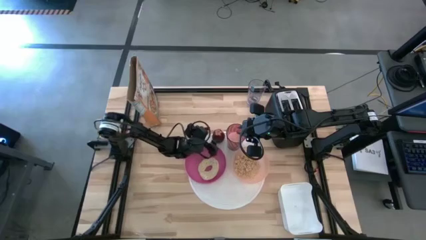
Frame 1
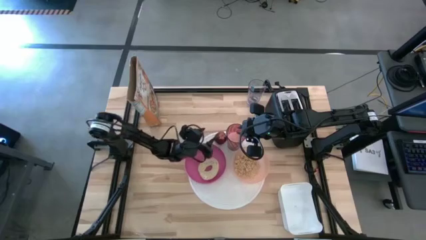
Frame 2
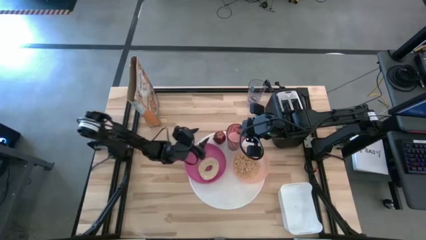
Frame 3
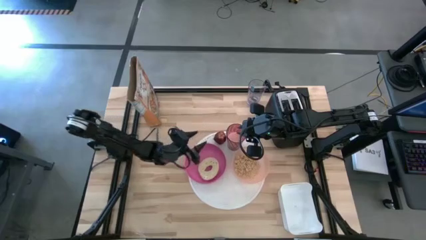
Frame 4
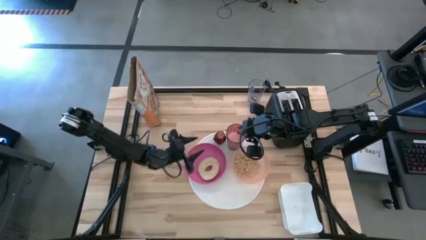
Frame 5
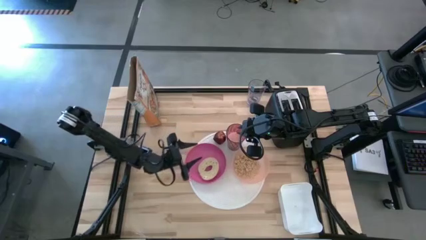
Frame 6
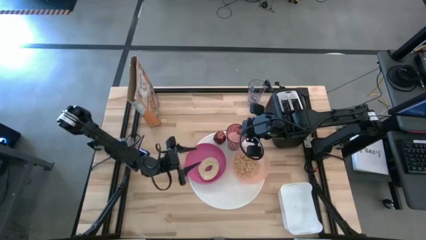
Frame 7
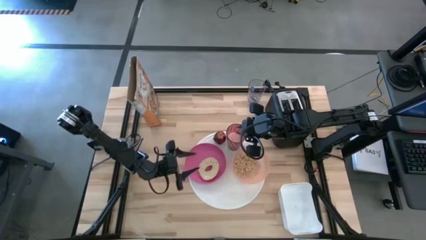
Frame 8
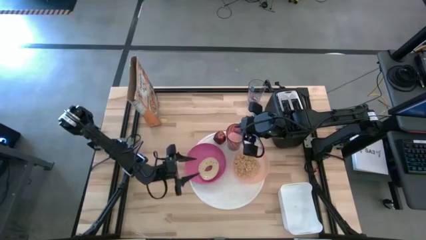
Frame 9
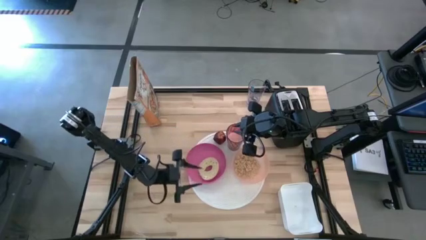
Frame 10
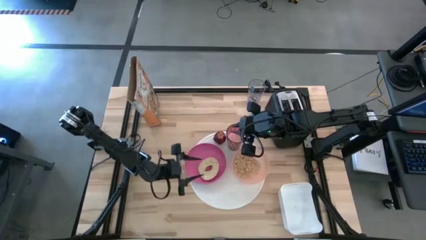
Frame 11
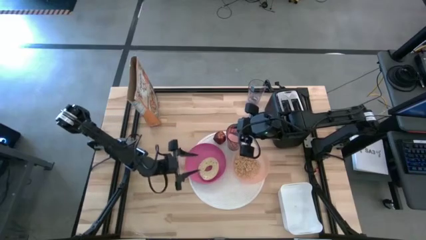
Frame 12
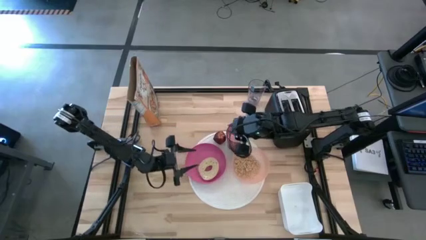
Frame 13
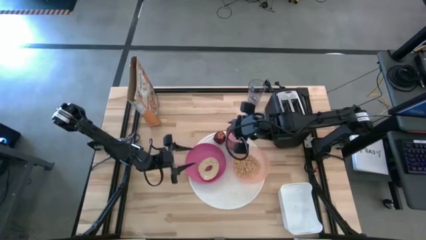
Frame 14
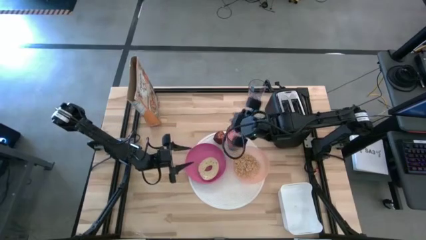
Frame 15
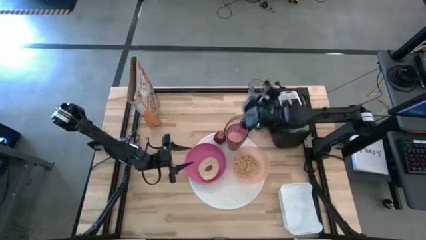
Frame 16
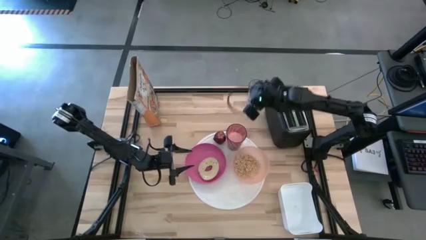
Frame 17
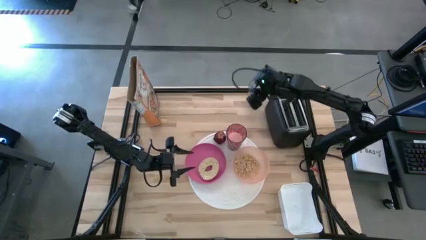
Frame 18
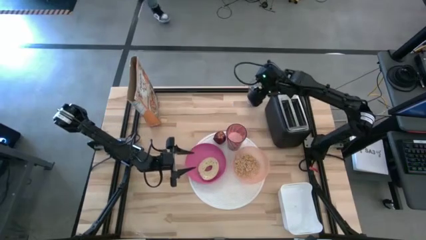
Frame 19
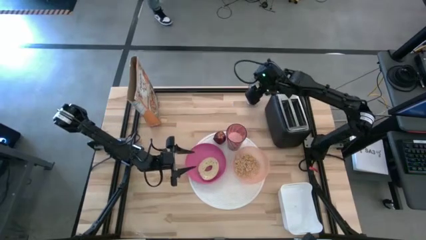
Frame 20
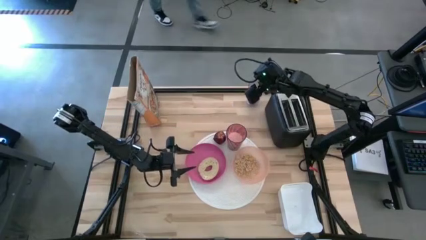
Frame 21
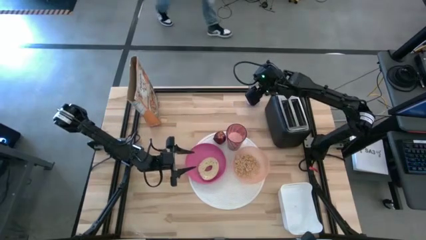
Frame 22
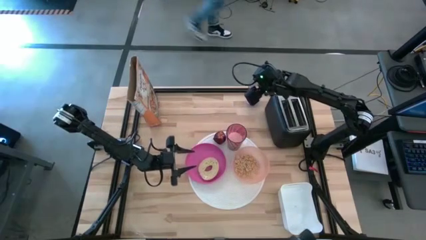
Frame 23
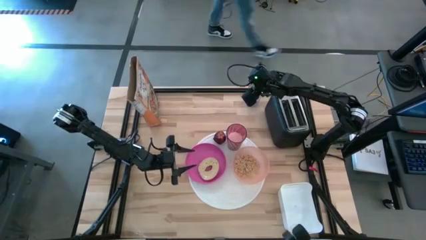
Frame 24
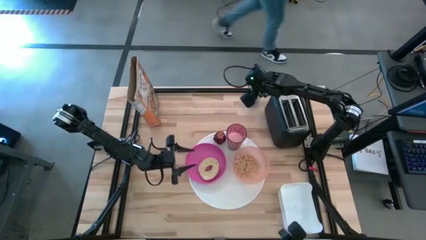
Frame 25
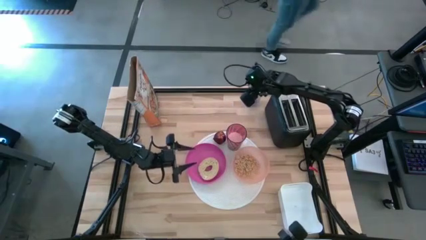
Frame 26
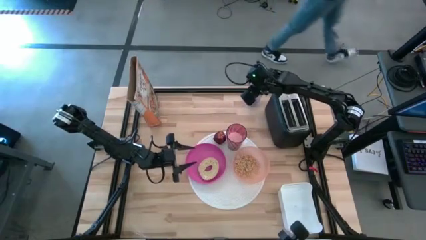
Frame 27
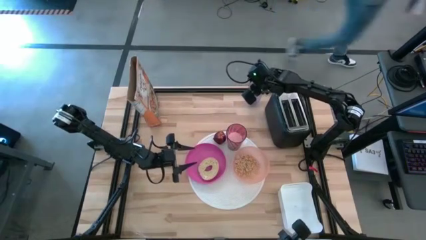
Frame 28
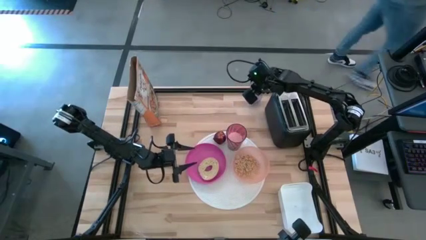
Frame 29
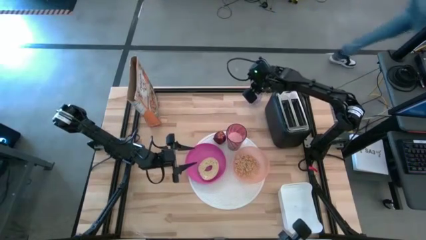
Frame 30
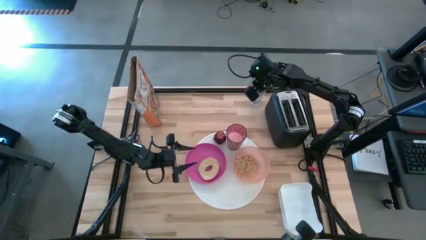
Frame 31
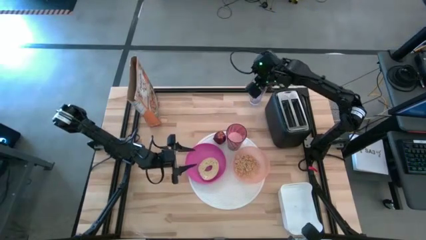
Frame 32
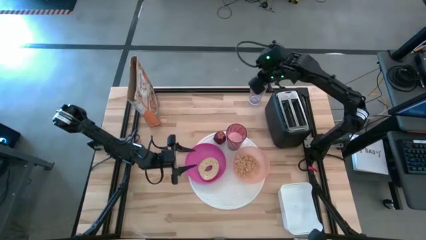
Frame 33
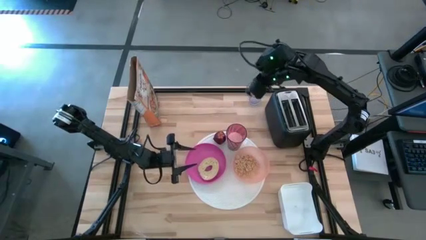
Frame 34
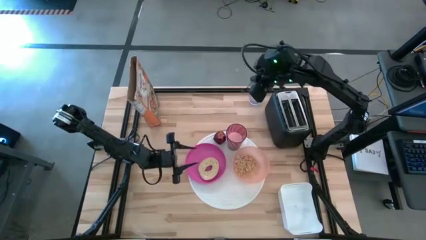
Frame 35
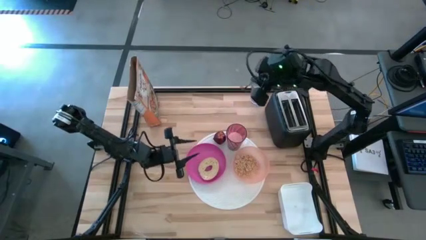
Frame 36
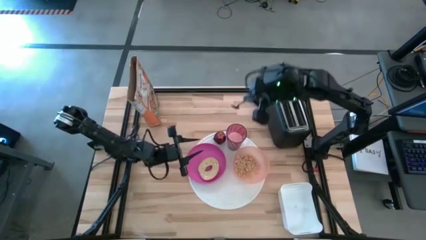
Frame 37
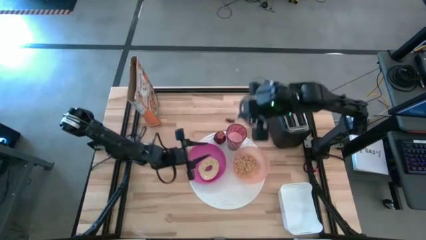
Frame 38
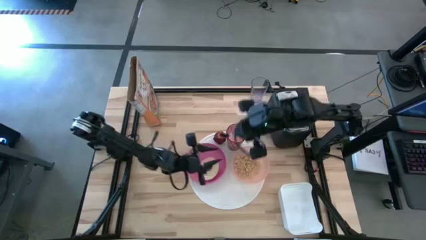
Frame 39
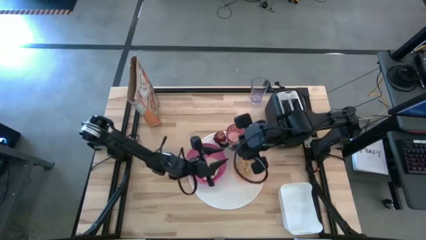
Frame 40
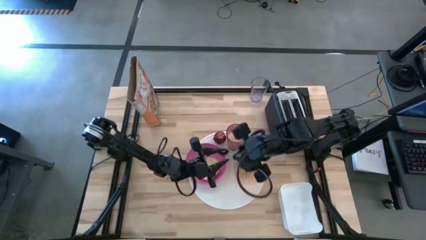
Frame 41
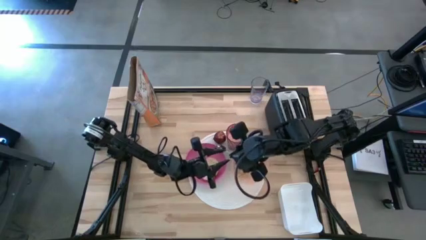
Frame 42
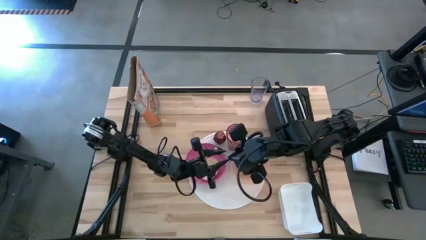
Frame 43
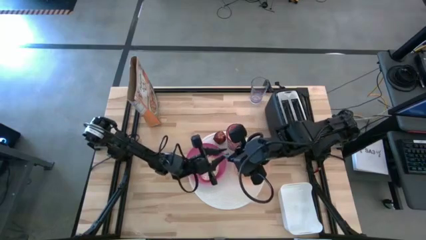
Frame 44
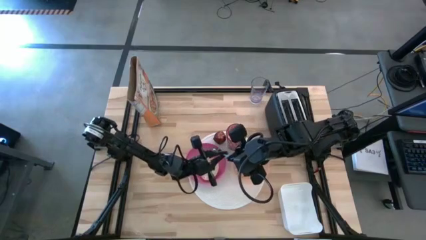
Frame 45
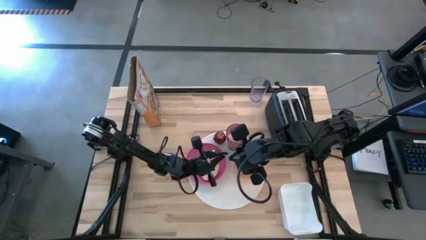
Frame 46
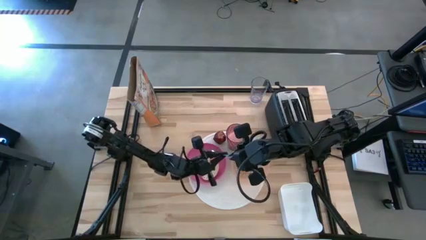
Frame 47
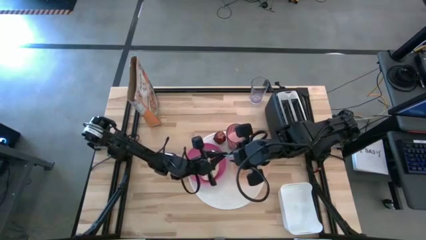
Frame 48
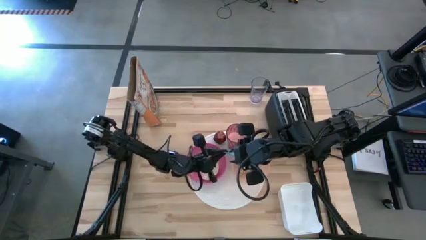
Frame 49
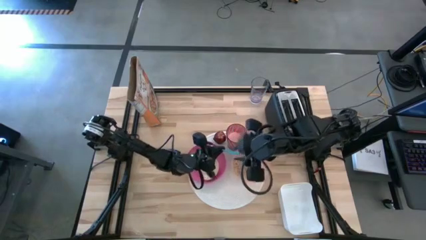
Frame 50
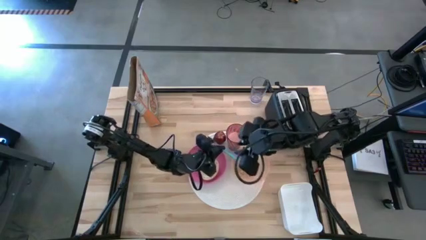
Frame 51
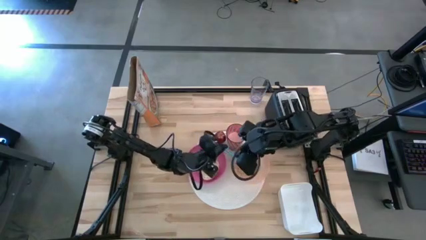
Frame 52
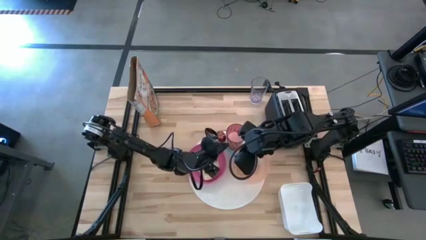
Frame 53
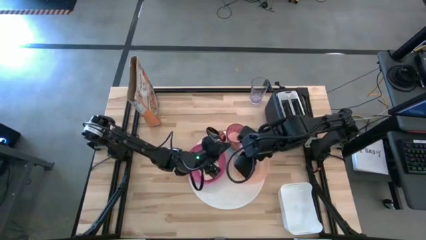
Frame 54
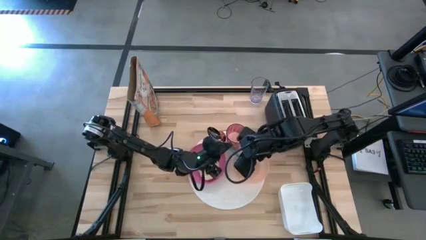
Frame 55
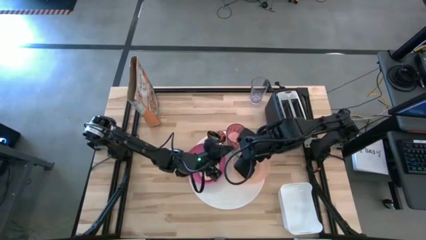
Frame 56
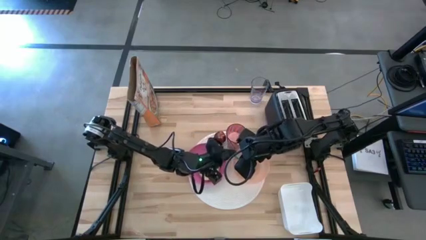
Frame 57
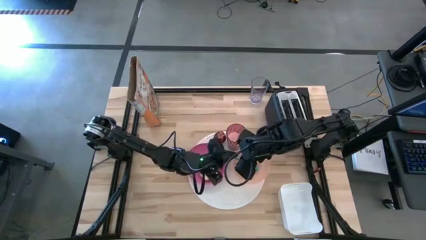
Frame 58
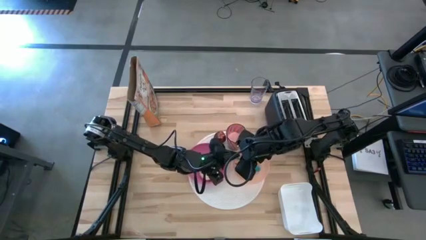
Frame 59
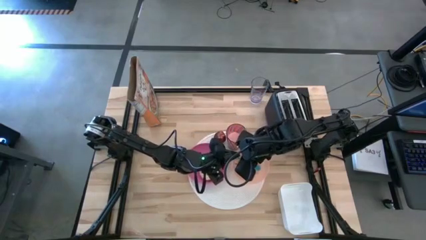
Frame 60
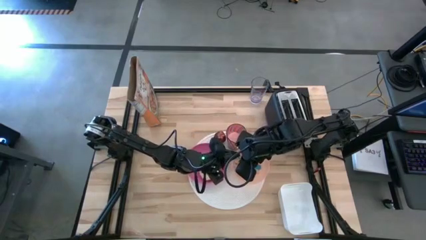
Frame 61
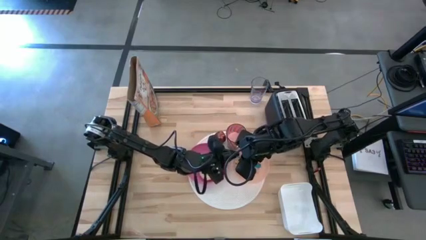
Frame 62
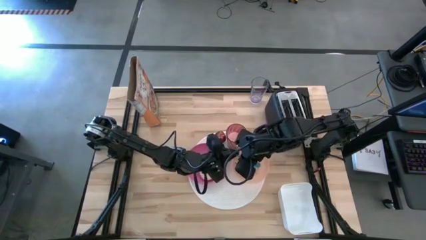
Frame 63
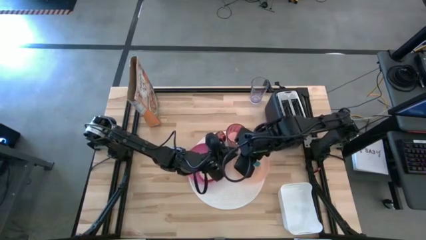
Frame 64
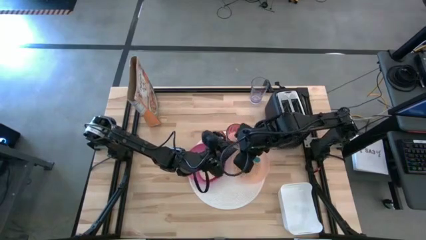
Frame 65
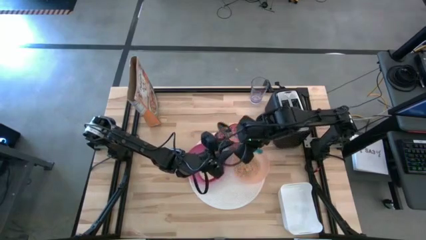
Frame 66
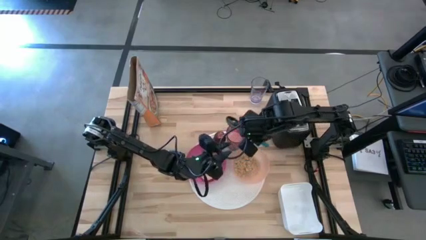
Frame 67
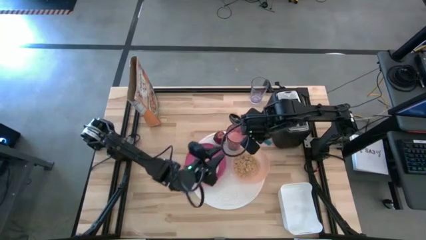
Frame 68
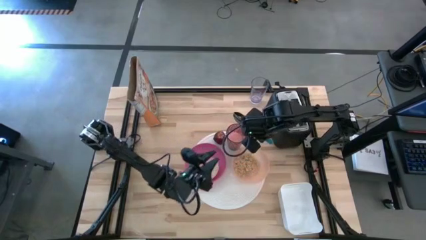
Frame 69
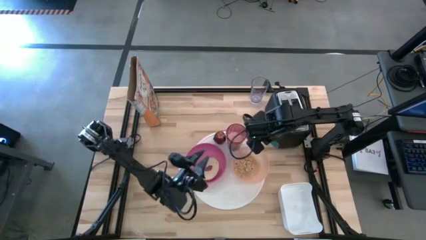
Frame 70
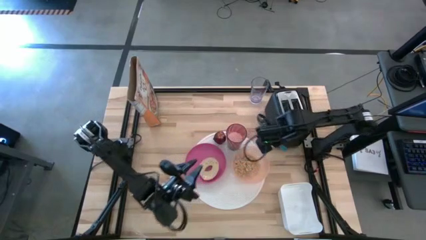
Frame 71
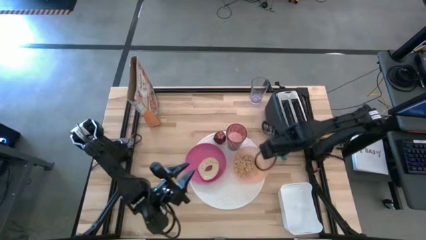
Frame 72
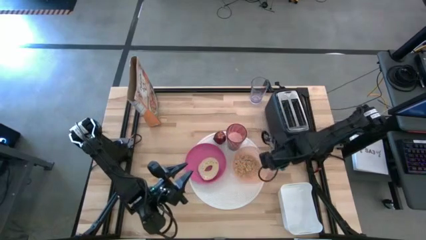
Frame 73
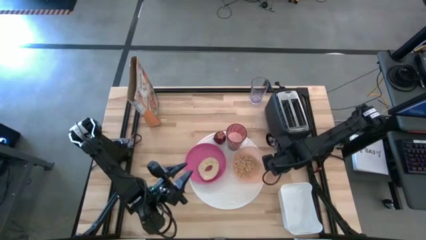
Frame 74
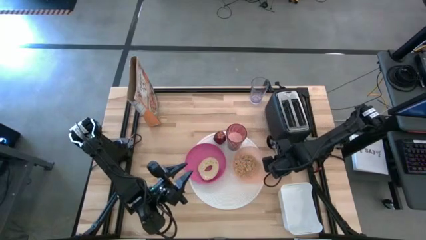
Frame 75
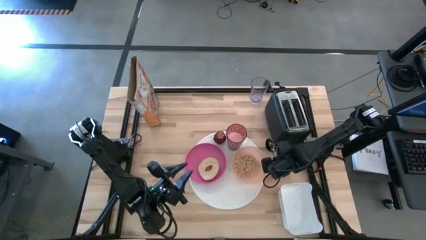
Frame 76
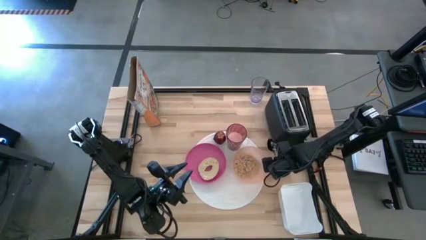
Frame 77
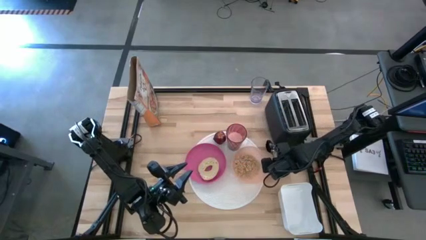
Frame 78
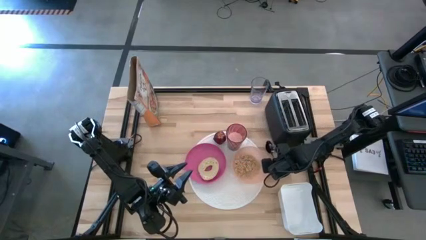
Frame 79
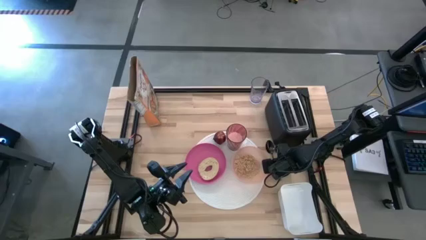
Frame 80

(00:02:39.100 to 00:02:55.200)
Task: Arrange a breakfast setting
Put the blue spoon from the blue cup beside the orange bowl on the white placemat
